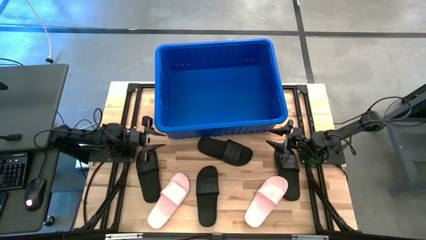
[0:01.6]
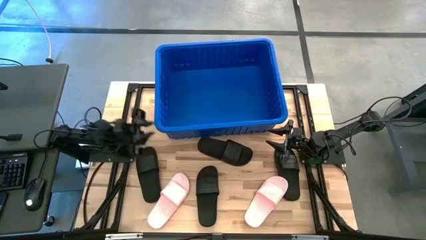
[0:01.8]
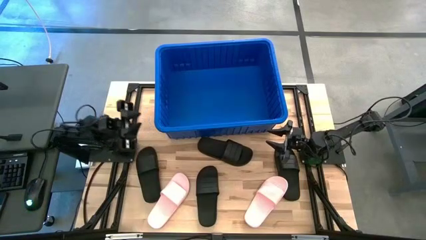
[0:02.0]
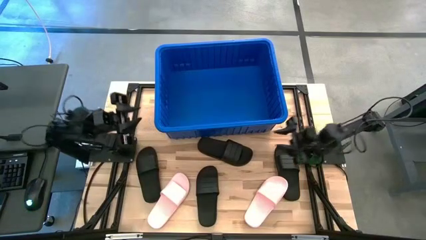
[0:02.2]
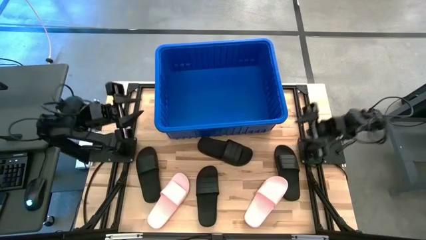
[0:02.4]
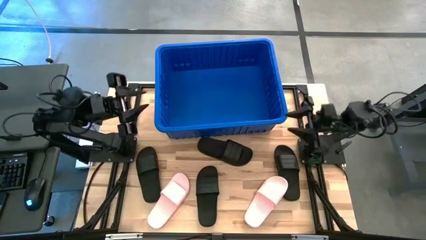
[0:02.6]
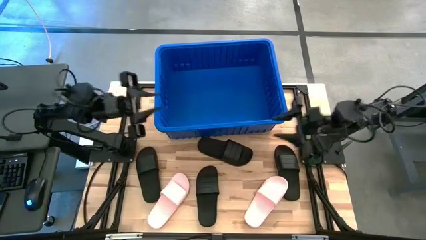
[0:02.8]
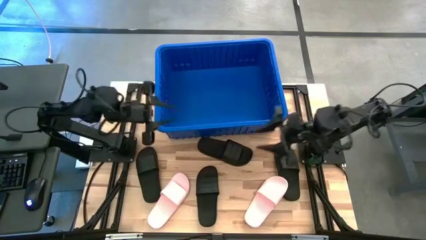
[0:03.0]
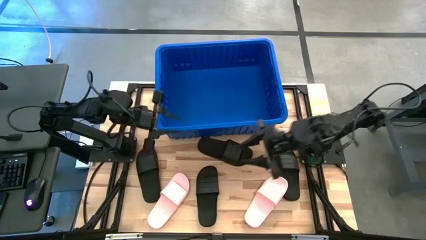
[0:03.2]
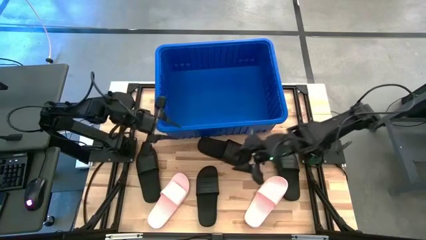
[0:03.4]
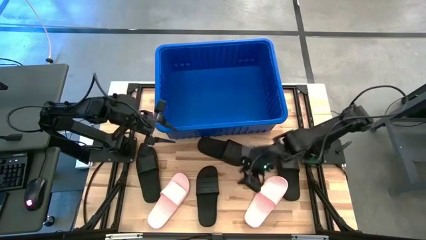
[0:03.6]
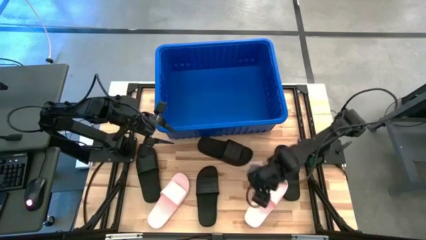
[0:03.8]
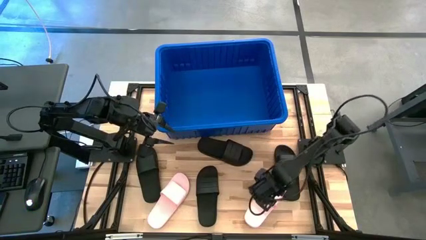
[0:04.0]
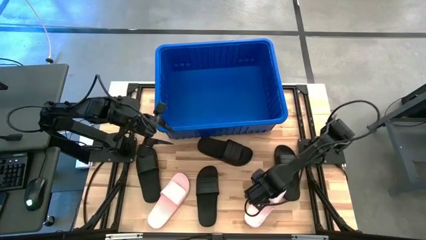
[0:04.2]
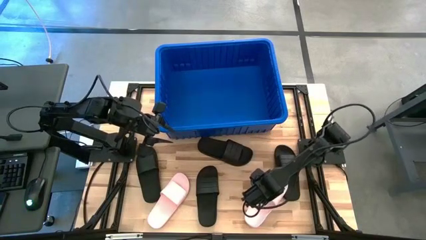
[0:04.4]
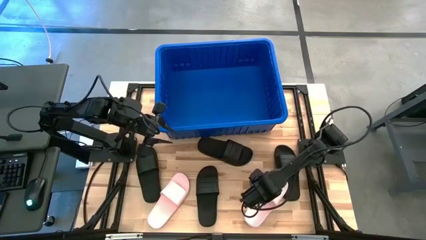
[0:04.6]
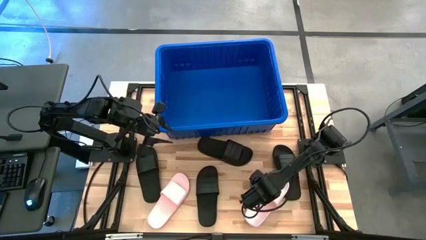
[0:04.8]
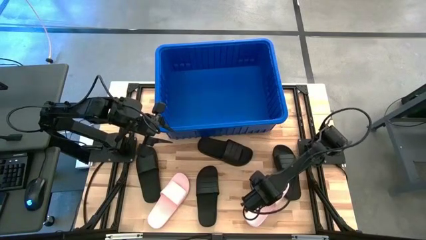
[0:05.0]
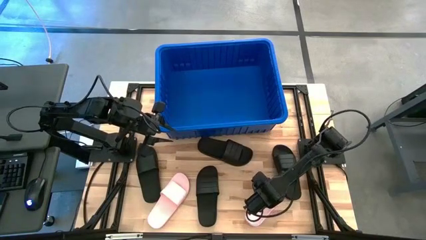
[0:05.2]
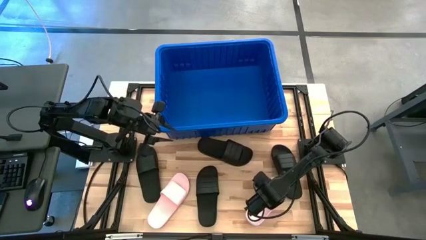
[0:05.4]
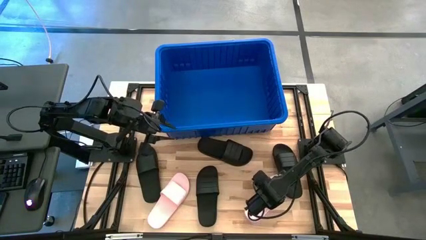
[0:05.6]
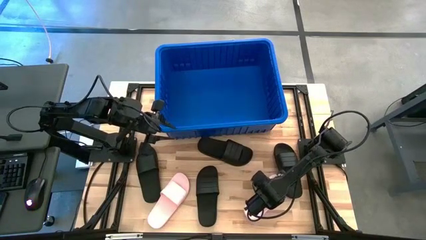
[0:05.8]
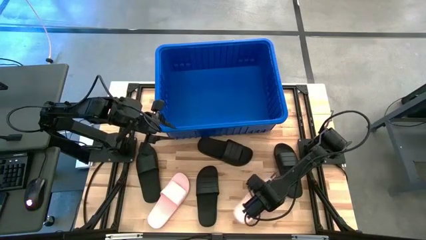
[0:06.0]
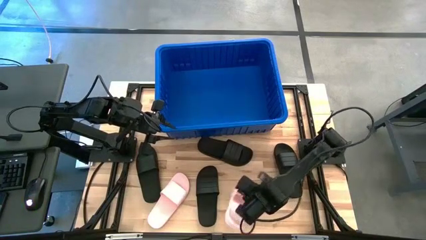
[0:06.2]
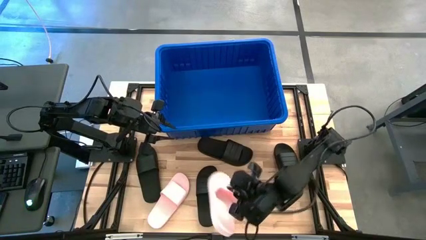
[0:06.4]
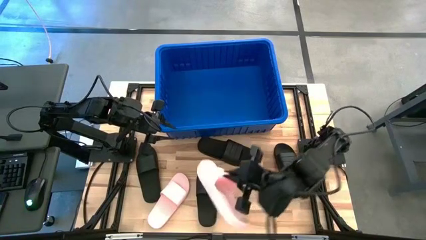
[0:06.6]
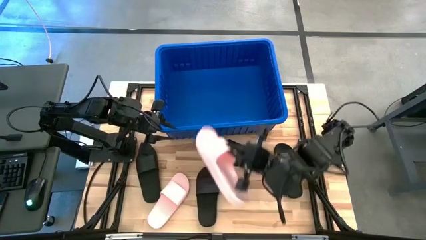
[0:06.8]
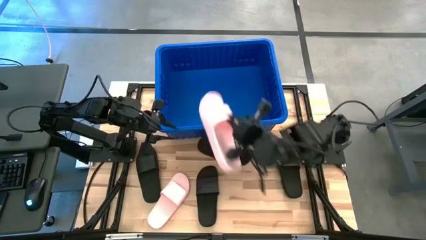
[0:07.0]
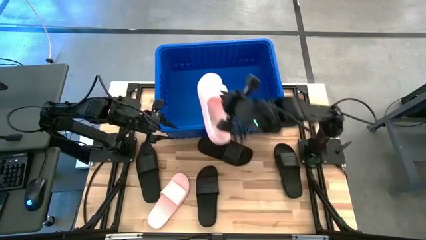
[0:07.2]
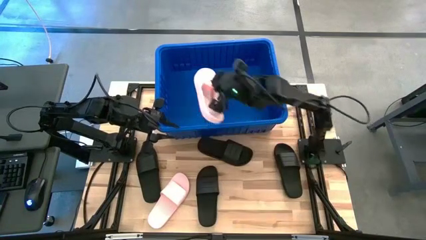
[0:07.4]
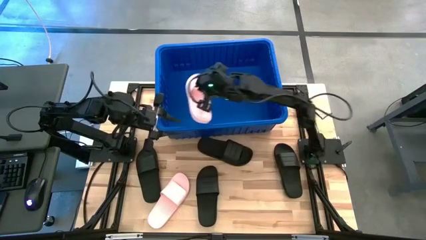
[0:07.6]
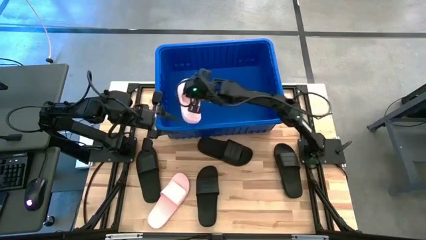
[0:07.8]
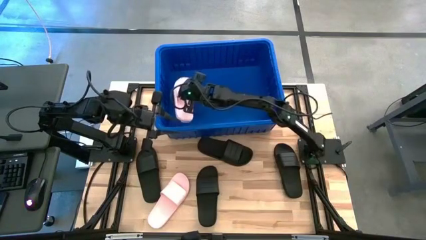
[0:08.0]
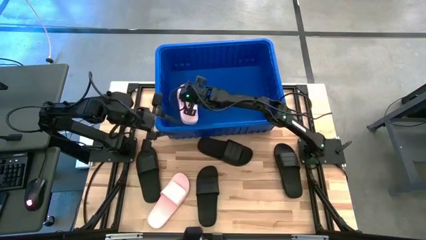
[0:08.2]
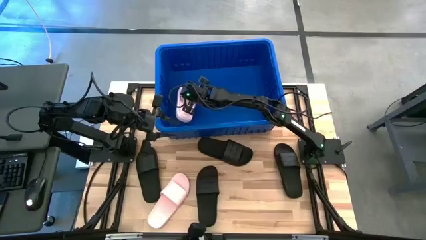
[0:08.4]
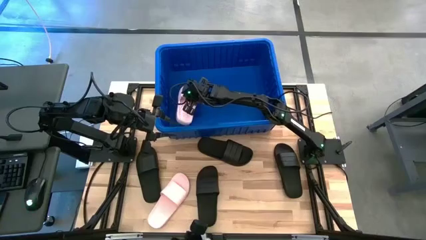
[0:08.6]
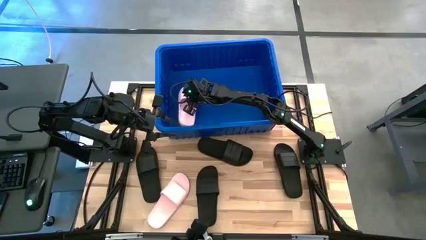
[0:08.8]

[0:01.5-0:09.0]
Task: Pick and place slides into bin
Put the pink slide into the blue container

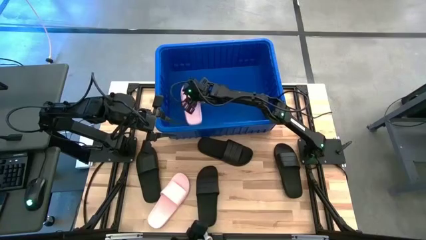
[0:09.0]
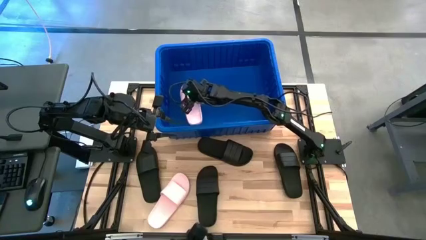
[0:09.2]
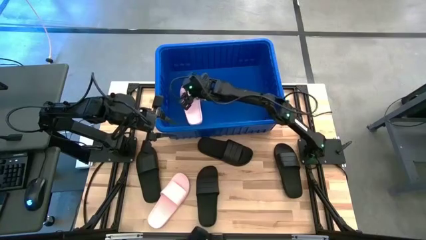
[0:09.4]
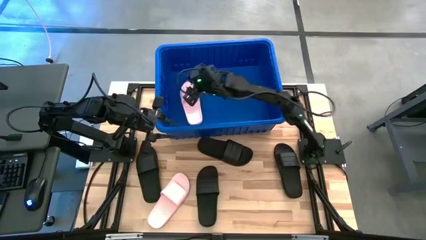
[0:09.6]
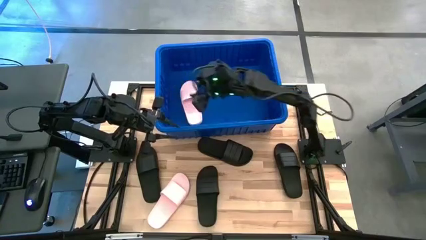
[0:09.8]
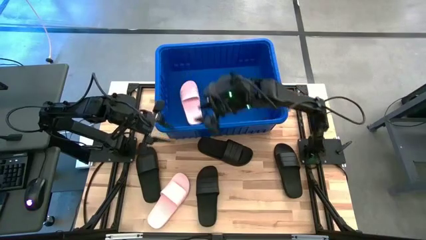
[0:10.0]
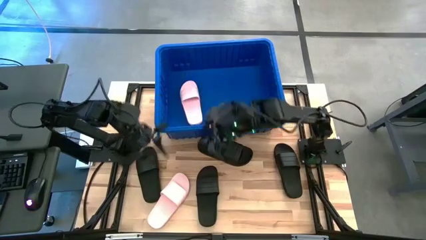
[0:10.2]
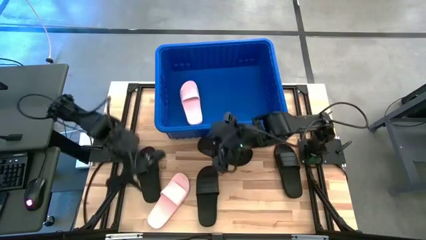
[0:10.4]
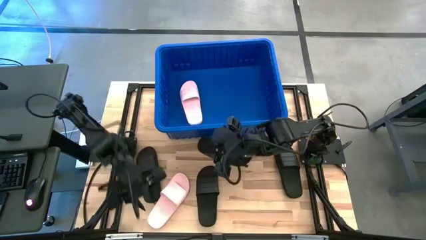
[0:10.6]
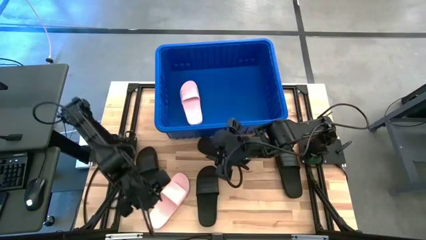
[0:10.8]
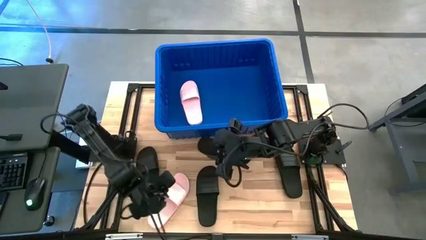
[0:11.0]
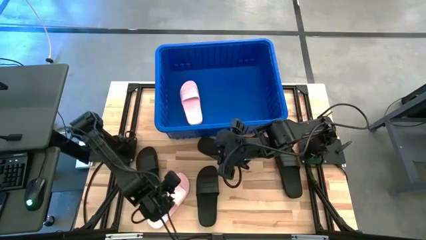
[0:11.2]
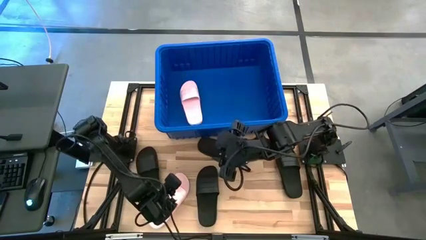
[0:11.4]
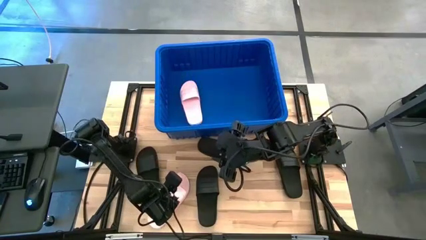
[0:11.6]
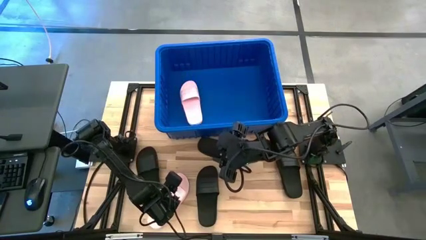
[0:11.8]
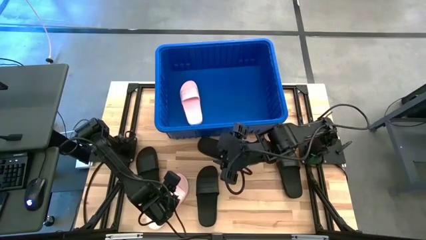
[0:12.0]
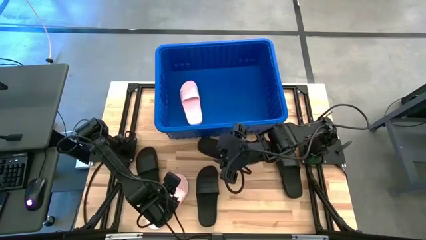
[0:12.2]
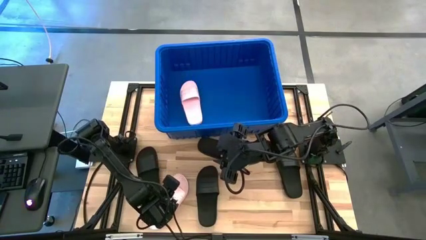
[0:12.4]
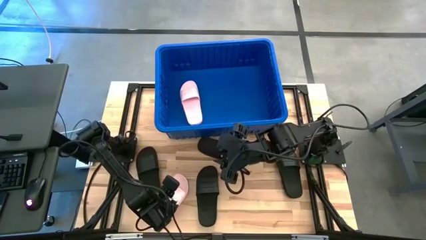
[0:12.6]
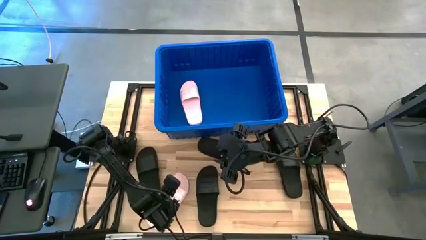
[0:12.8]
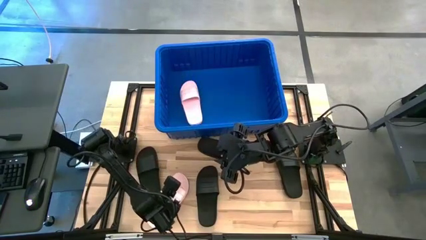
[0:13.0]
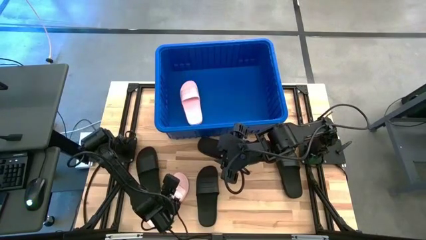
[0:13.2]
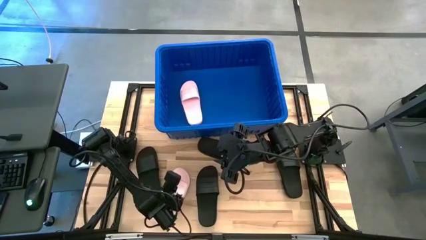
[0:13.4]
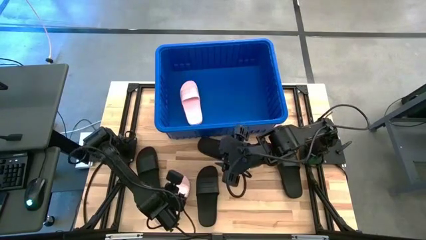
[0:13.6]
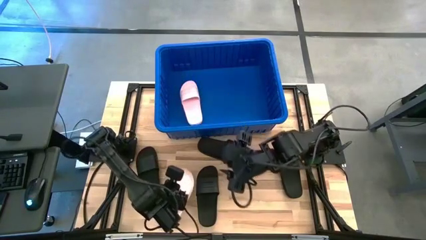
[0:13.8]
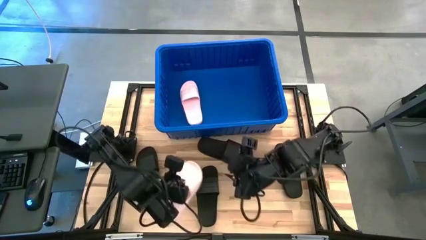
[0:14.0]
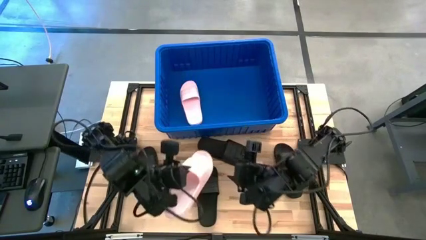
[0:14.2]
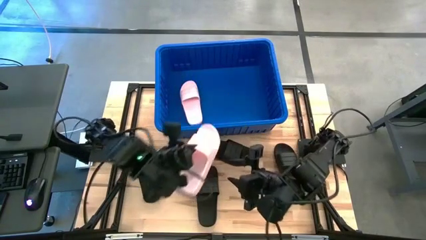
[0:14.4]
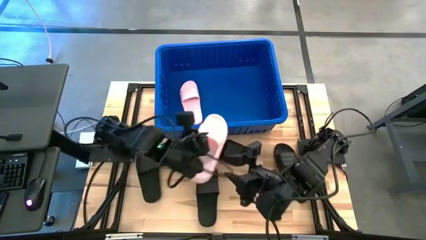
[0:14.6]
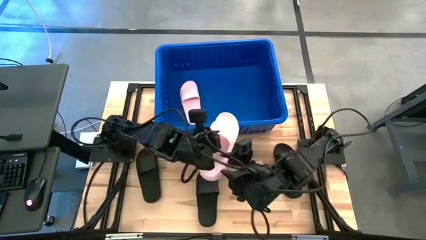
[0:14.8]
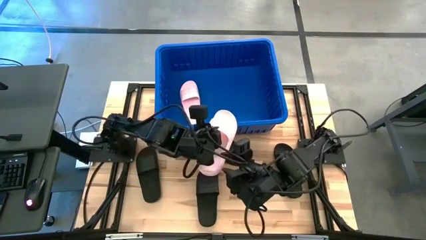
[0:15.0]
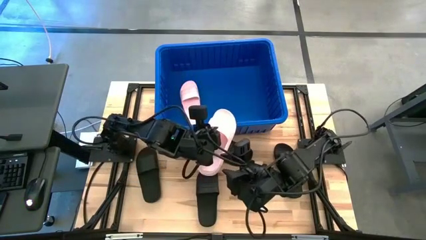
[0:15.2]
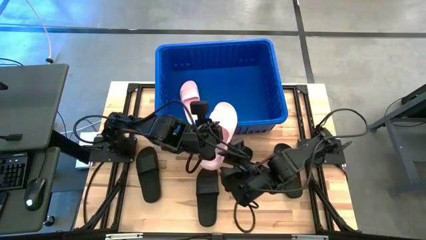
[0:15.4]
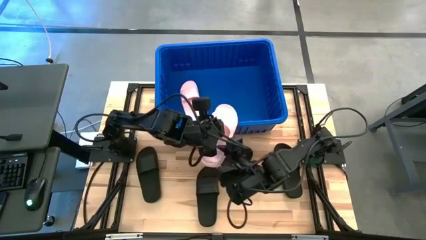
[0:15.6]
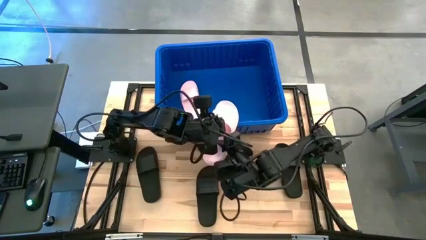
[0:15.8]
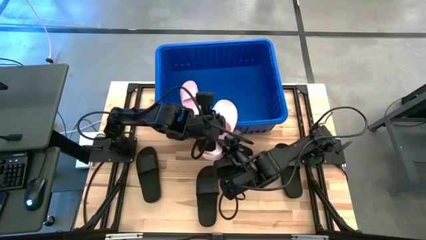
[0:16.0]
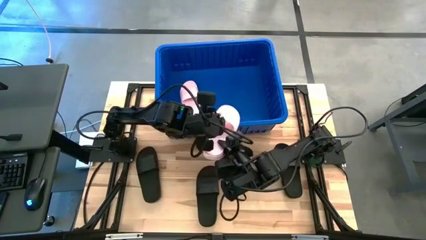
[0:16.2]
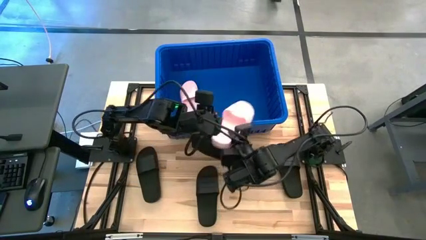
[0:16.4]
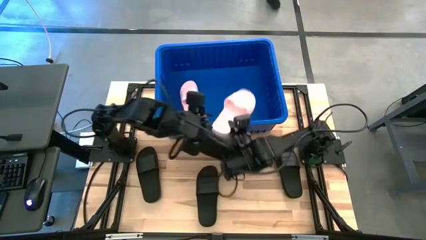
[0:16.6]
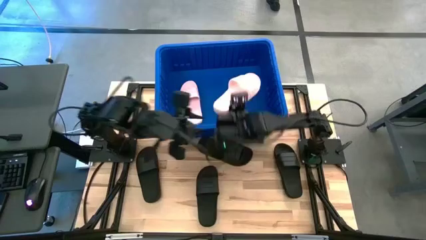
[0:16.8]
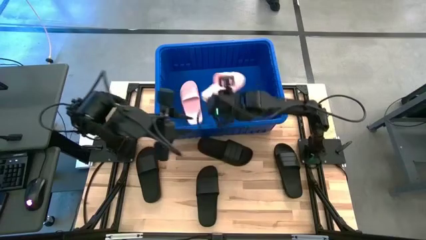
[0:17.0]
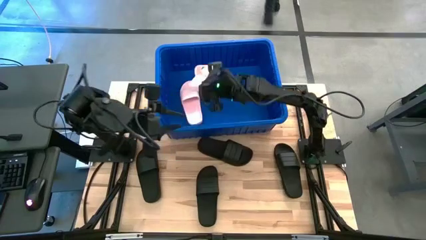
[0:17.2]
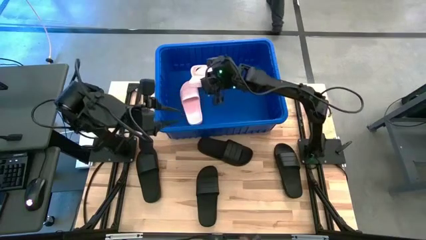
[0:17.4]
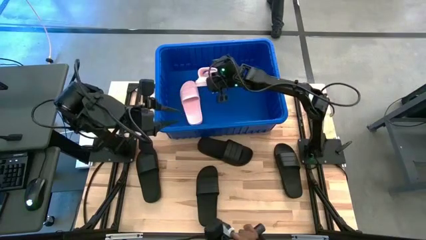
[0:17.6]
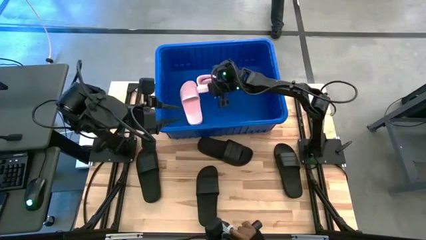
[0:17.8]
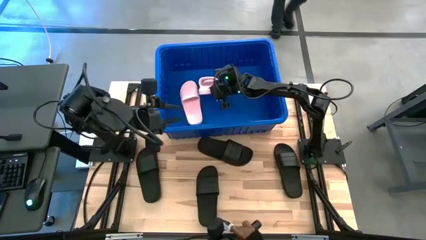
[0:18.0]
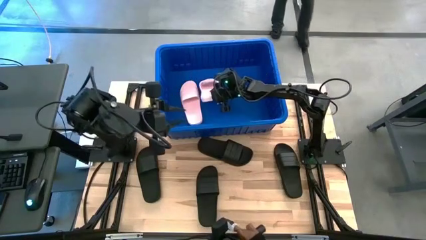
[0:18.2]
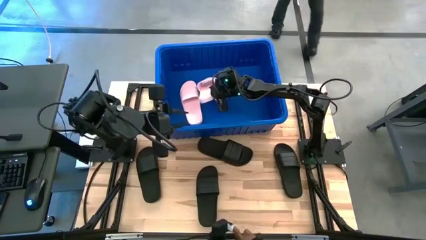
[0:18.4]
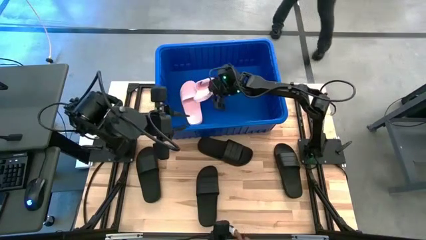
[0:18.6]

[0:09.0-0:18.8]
Put the pink slide into the blue container
